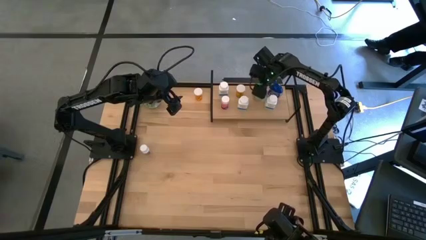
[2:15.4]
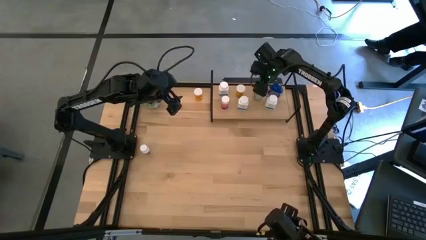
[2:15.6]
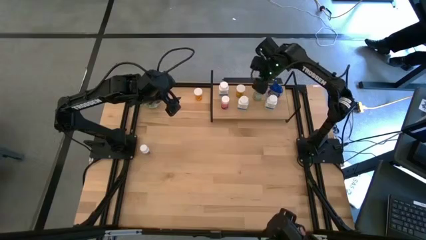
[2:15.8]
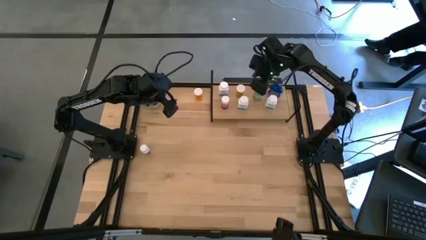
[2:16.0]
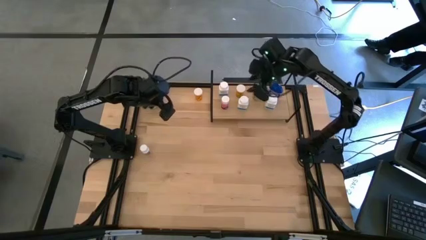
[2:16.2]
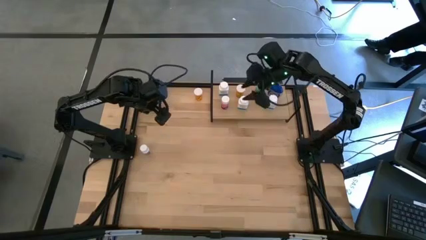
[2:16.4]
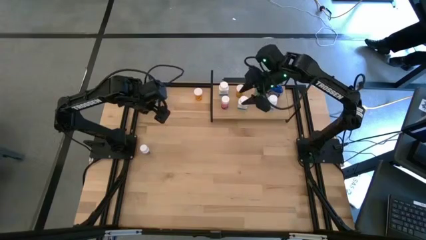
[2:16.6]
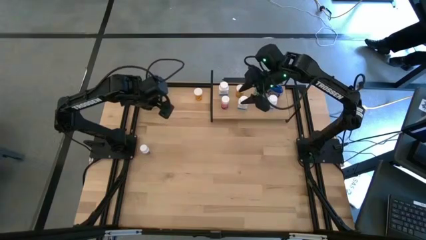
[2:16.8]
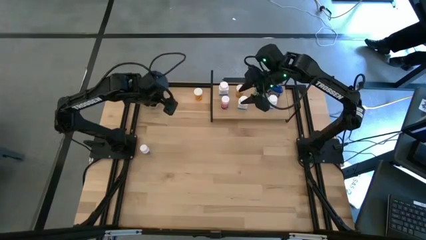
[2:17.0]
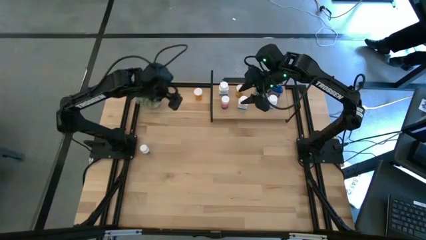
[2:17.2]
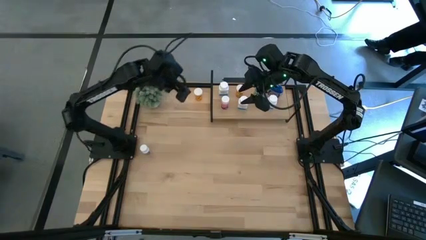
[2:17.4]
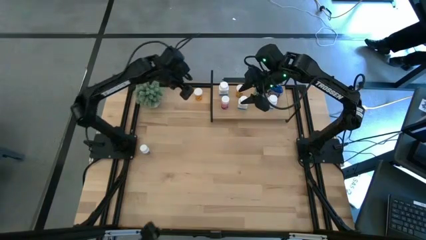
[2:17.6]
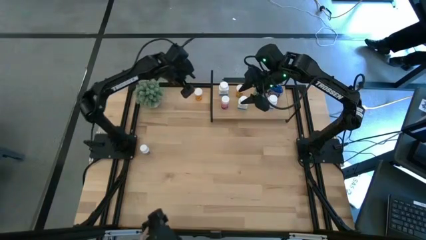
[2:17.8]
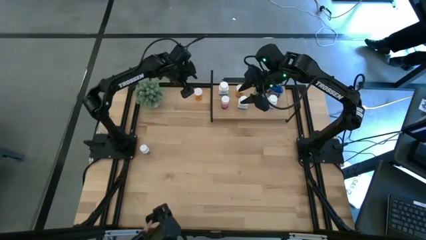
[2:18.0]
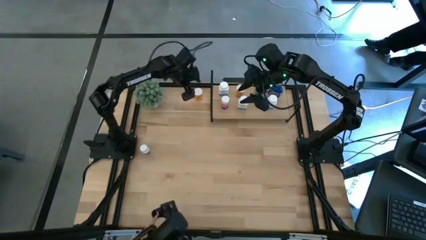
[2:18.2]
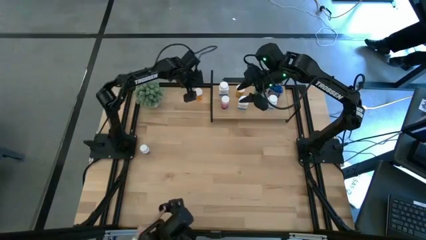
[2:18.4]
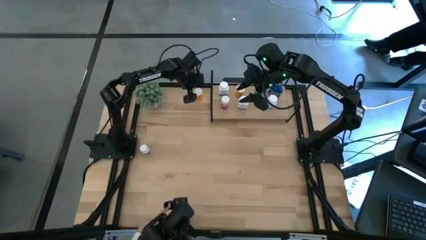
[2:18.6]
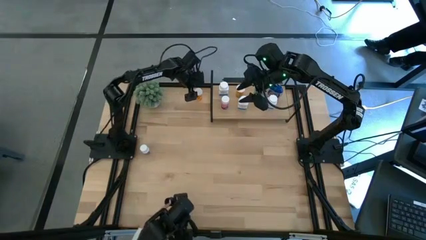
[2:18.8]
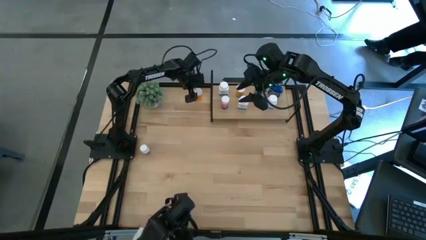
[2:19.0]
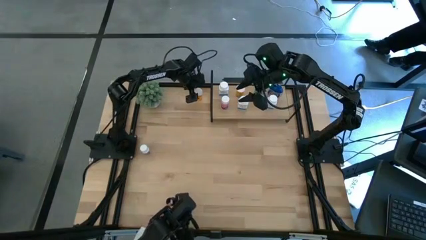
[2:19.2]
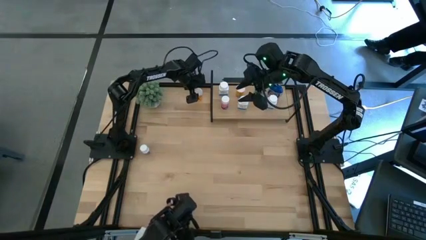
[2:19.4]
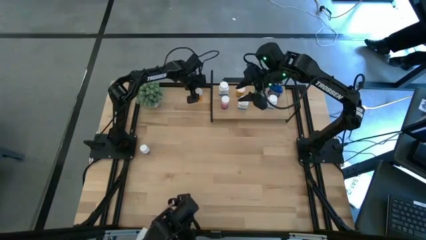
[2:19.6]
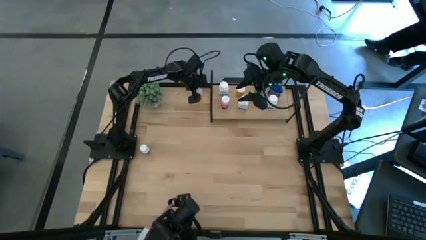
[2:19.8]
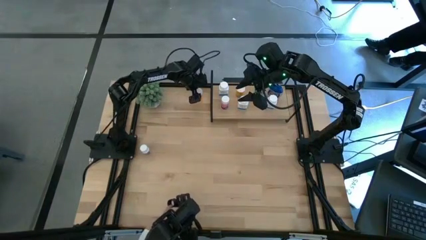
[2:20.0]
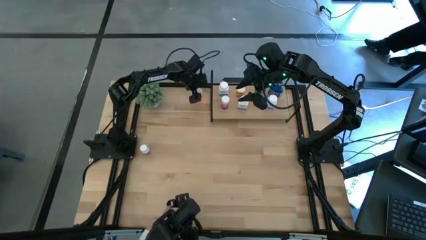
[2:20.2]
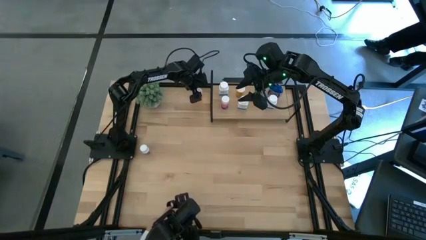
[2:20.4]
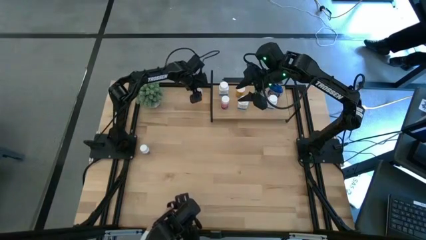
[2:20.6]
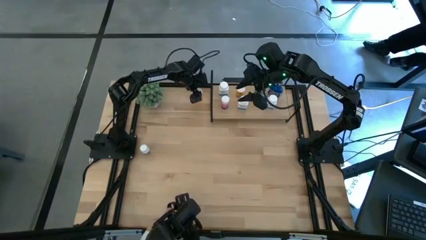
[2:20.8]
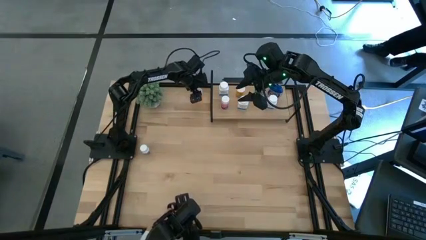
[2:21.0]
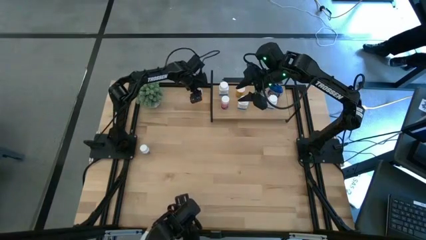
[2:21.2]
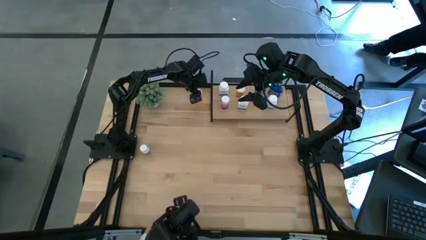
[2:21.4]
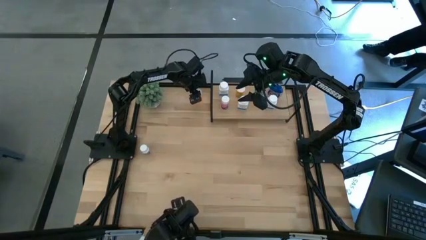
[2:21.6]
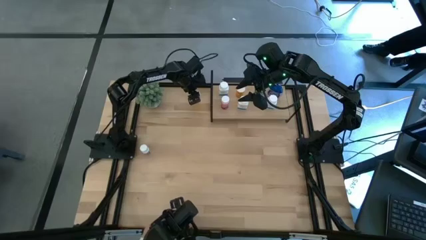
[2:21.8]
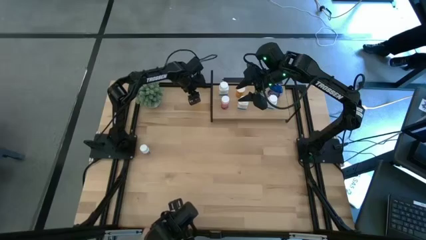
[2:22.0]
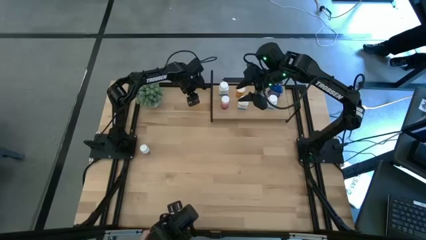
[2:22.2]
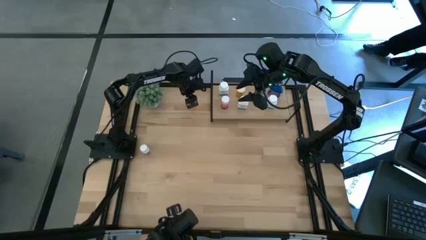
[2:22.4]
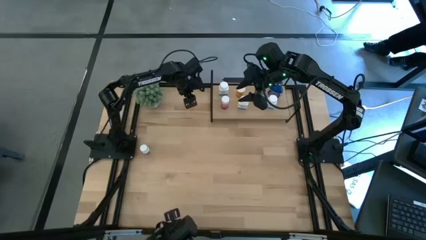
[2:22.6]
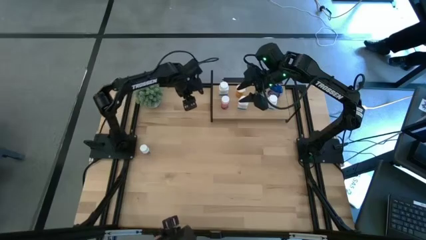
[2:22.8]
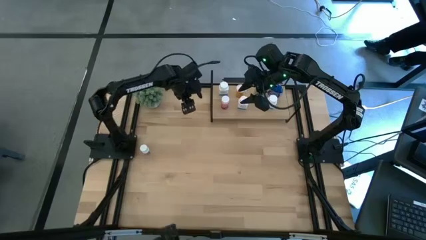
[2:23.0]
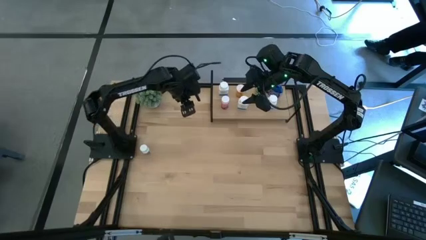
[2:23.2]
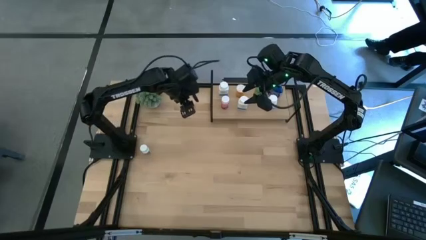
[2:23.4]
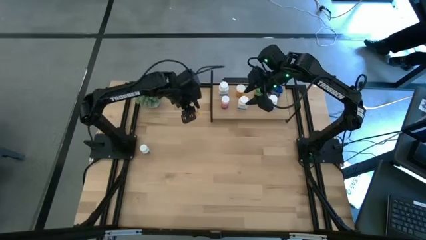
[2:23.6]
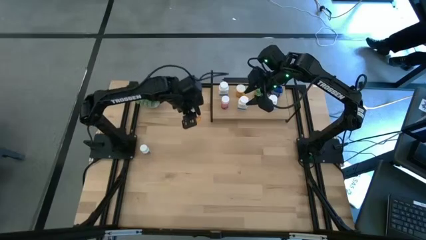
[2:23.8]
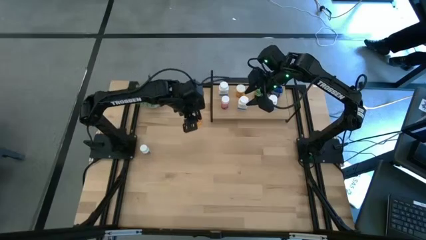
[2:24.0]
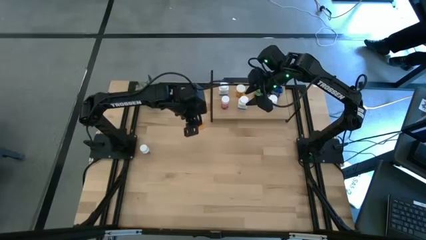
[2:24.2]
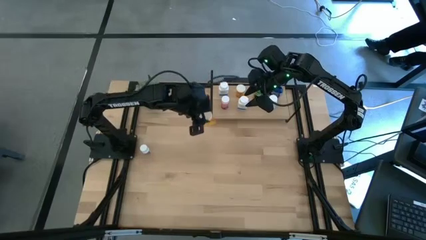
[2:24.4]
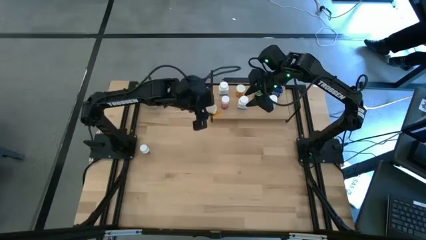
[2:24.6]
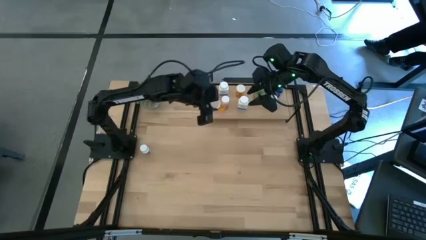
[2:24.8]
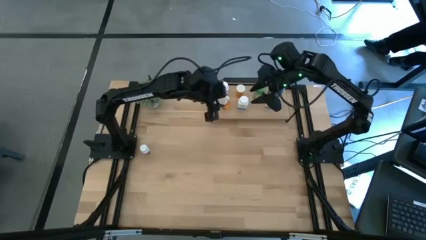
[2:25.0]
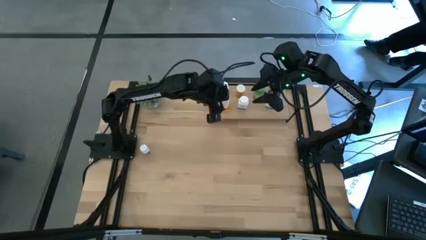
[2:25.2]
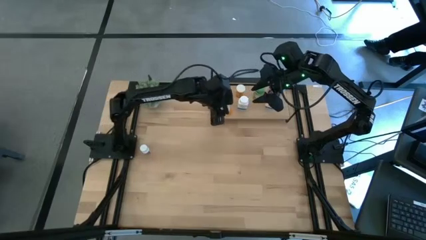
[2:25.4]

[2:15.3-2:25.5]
Task: Pick and place medicine bottles onto shelf by color
Put the orange medicine bottle on the shelf
